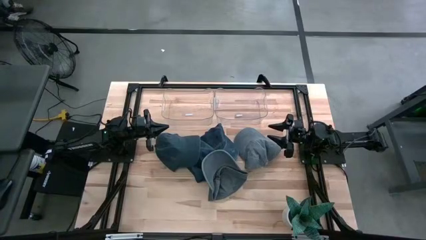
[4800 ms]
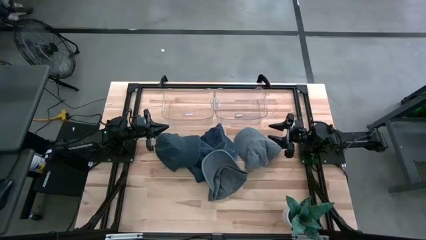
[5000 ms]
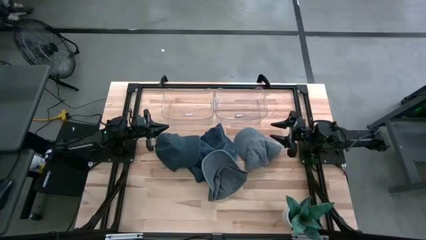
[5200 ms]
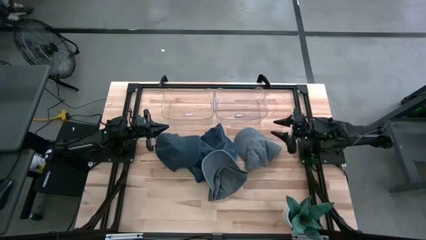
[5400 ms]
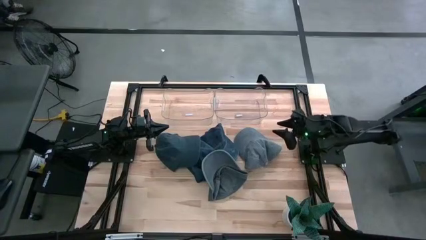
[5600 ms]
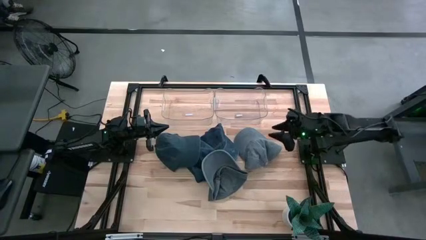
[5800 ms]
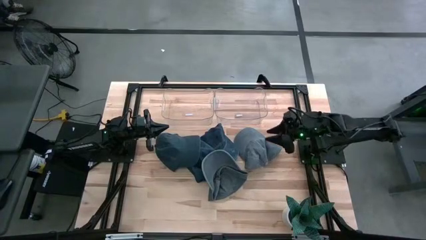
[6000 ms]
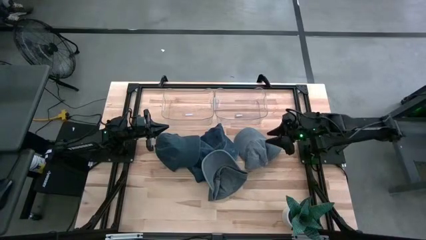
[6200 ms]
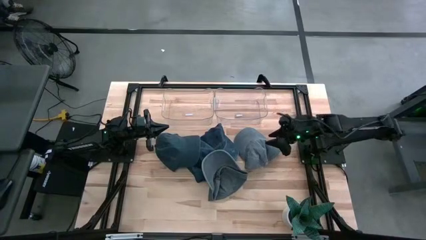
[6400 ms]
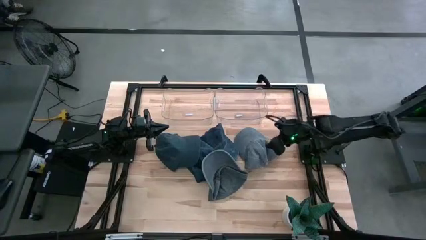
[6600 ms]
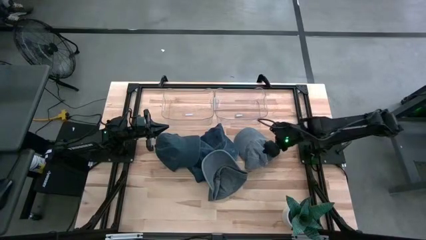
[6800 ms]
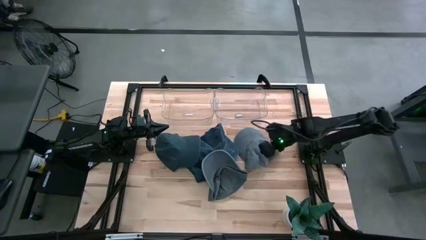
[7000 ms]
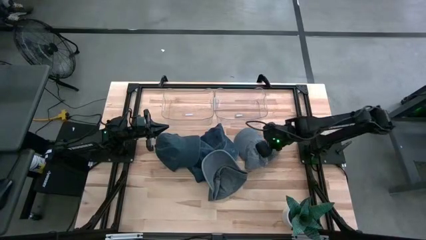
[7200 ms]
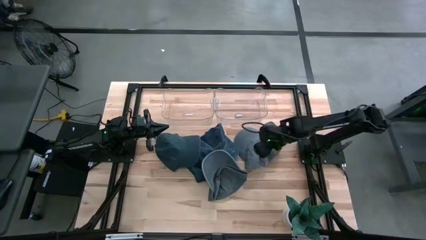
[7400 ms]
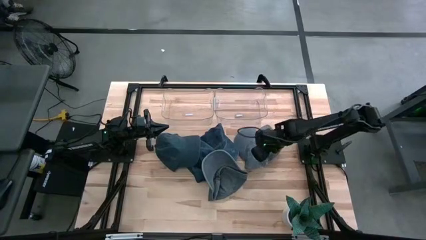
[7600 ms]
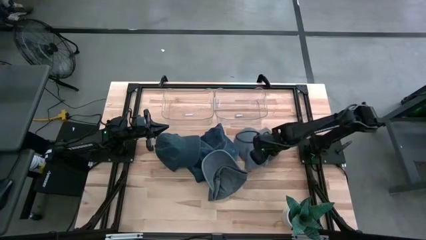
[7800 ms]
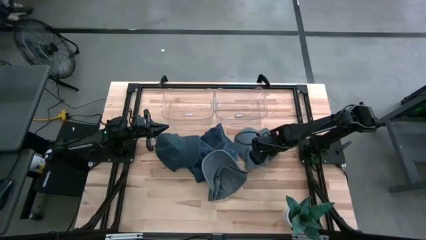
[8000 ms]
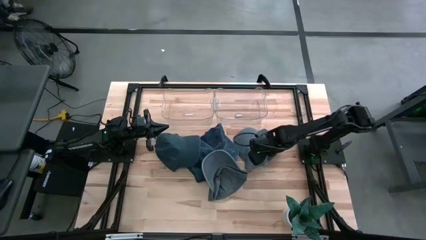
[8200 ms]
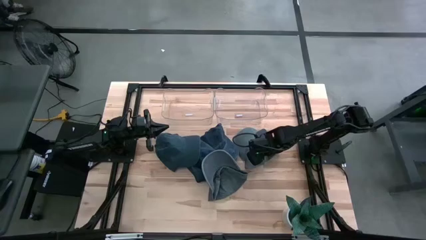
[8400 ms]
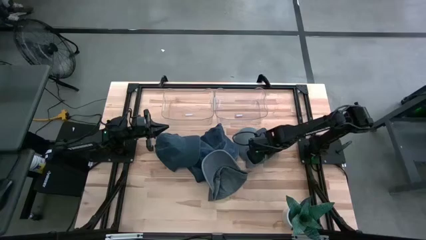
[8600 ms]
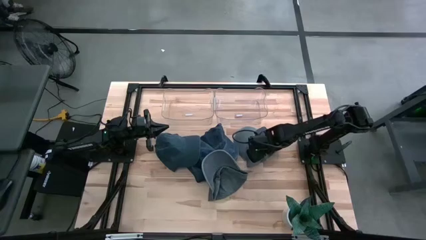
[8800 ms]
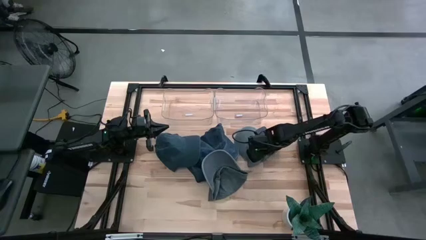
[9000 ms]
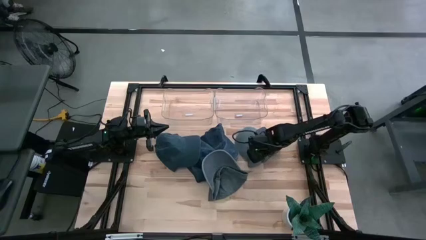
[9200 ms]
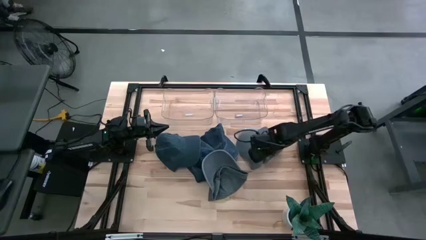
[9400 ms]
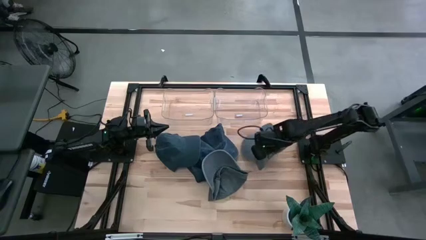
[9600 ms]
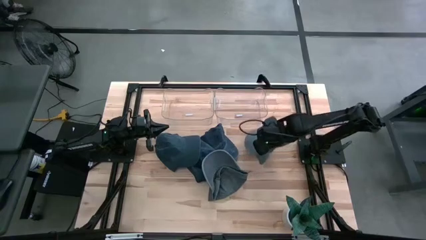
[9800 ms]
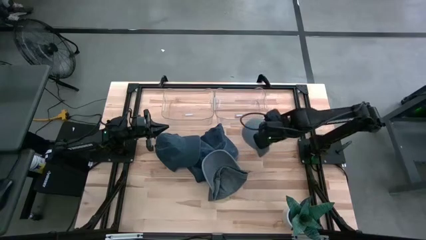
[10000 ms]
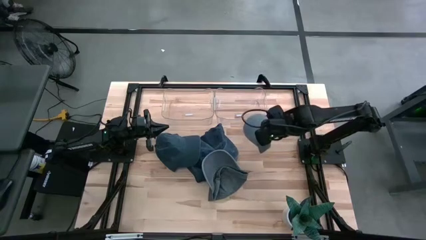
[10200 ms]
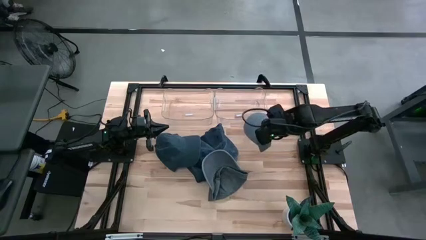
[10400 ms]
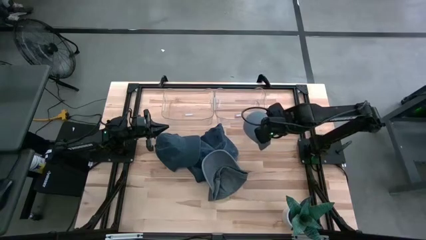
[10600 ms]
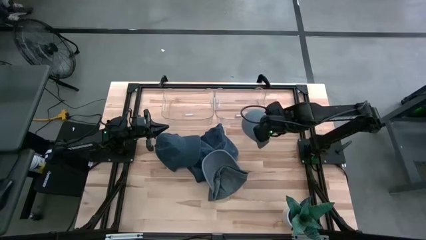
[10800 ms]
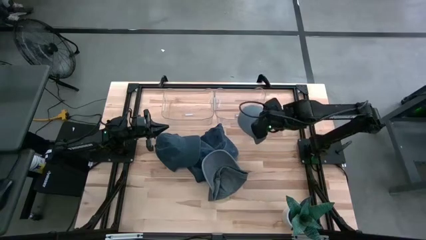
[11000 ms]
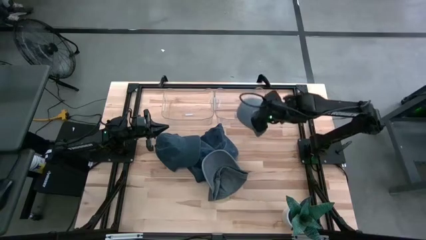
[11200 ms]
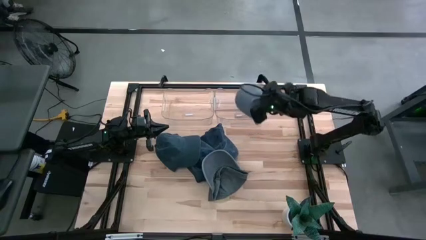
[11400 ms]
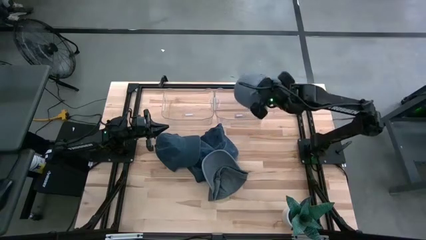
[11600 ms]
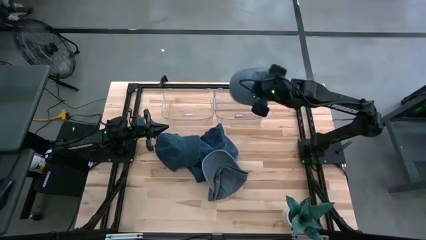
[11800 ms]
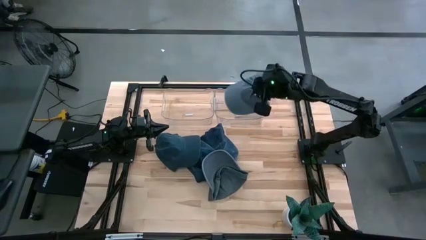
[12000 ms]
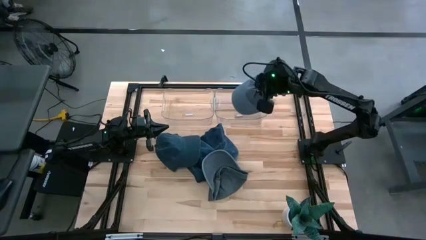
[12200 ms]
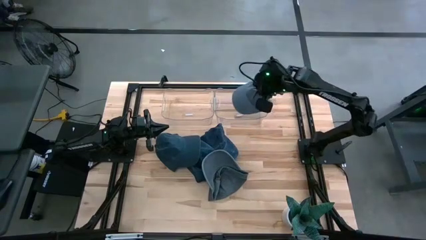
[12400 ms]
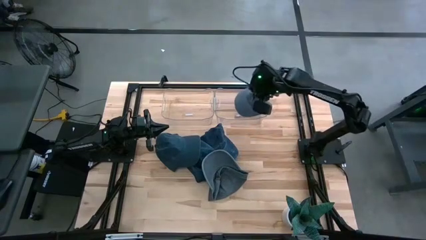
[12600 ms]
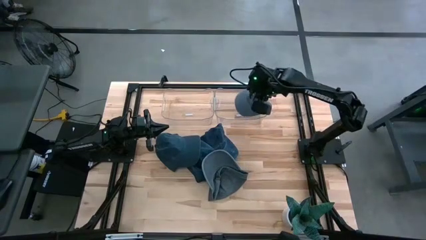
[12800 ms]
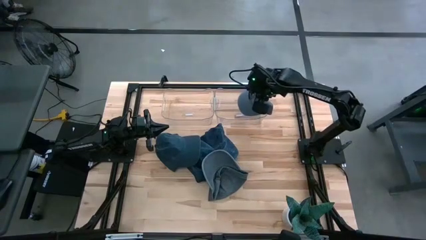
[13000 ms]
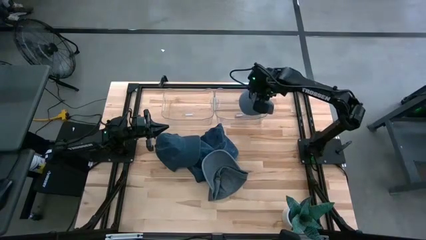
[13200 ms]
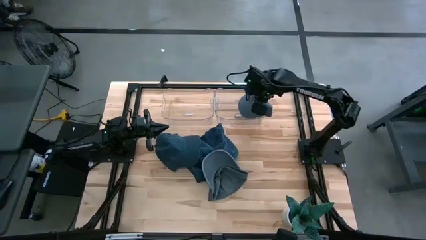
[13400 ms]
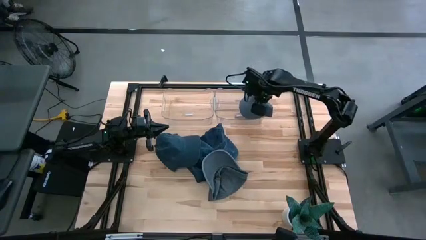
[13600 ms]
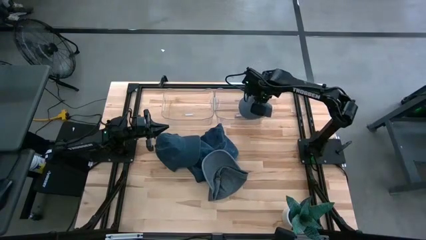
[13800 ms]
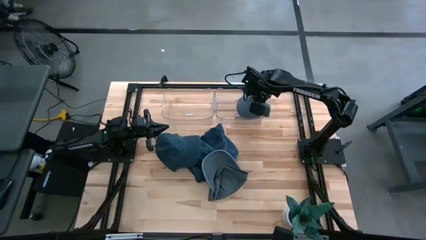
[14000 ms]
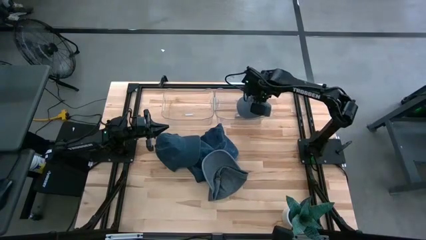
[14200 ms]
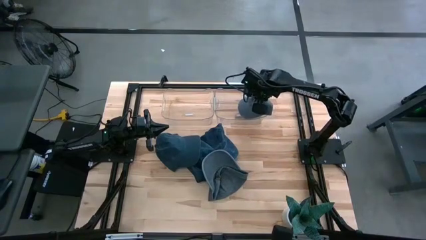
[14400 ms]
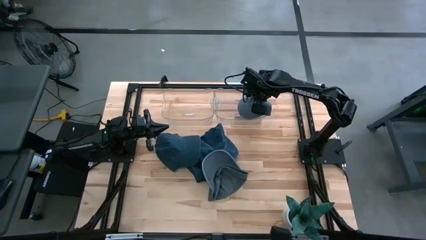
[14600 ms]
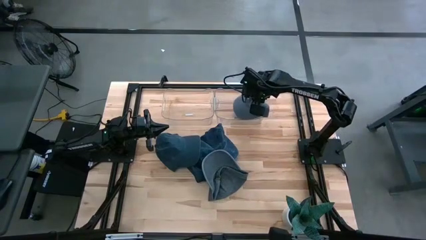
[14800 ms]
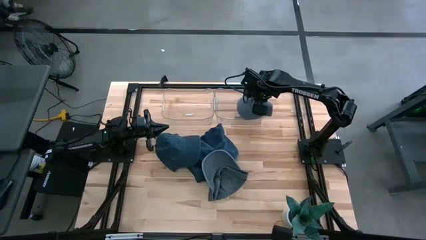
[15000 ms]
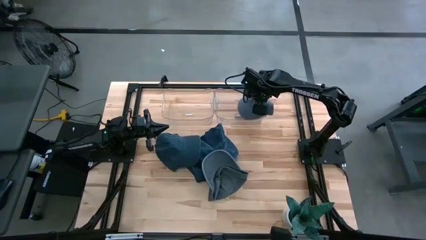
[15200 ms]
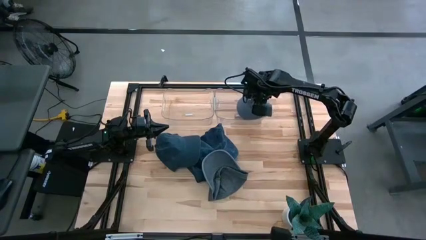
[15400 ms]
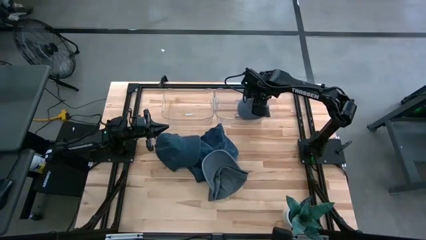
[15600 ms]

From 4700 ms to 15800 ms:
Task: Pick & Place hat
Put the right gray cap into the right transparent bin

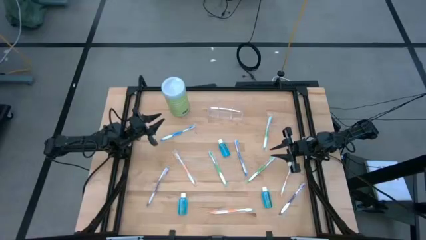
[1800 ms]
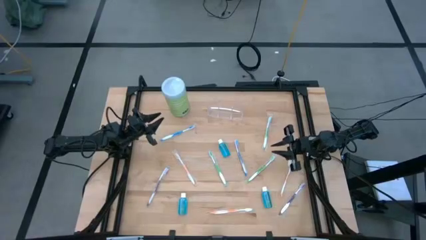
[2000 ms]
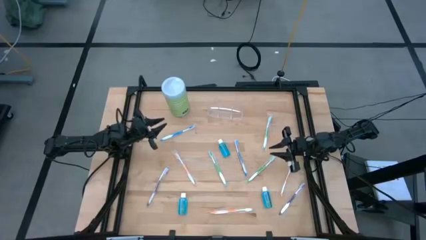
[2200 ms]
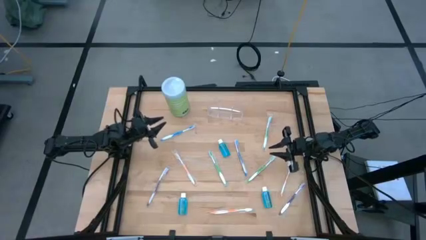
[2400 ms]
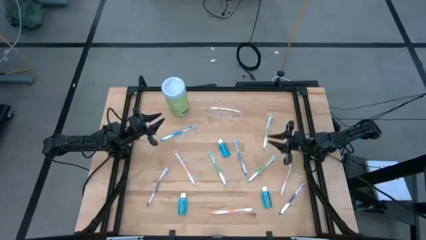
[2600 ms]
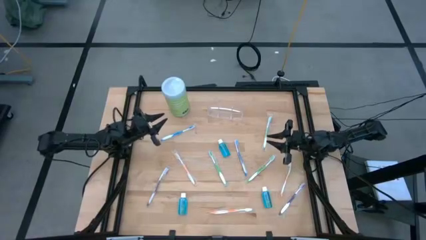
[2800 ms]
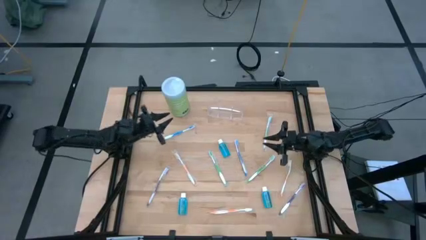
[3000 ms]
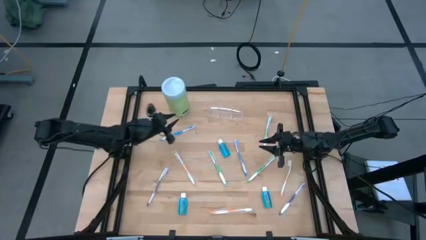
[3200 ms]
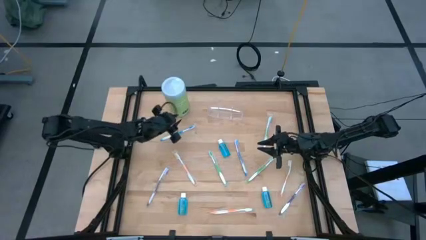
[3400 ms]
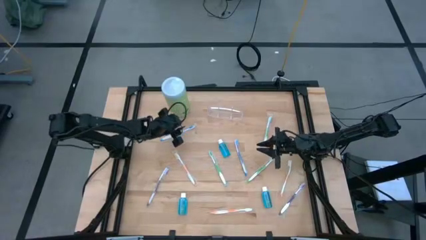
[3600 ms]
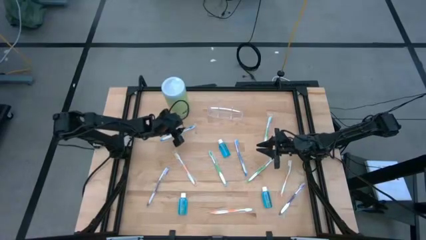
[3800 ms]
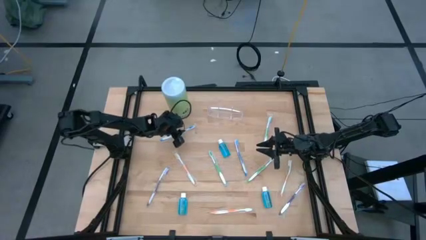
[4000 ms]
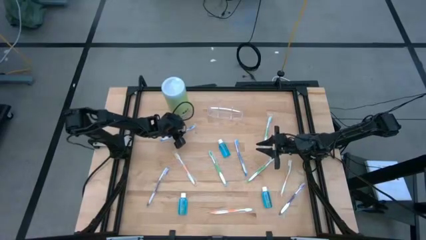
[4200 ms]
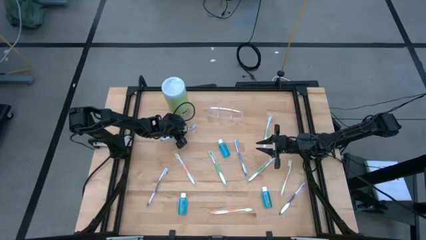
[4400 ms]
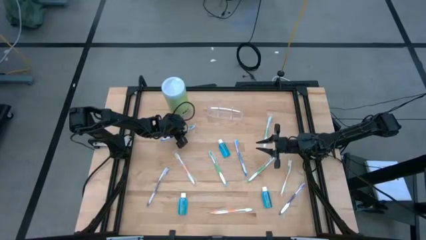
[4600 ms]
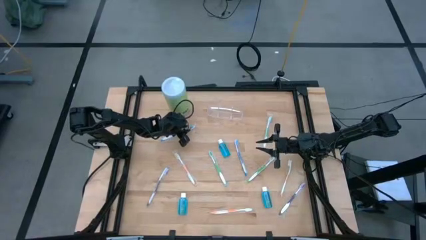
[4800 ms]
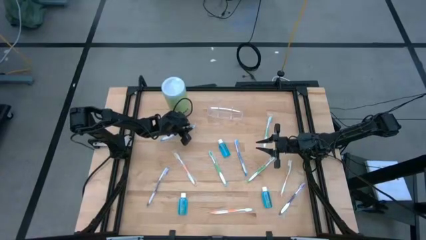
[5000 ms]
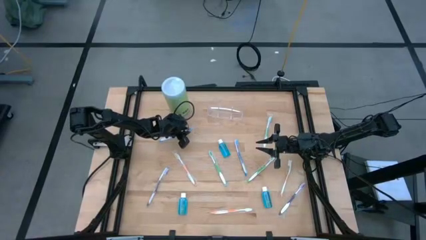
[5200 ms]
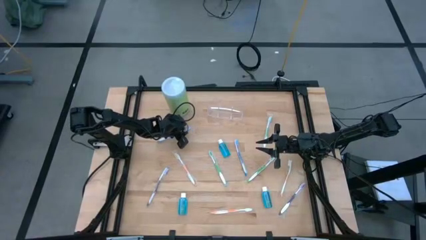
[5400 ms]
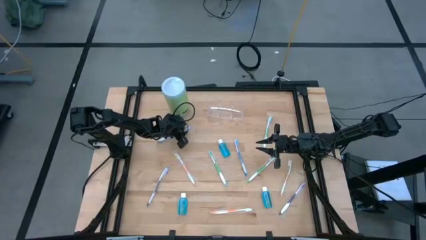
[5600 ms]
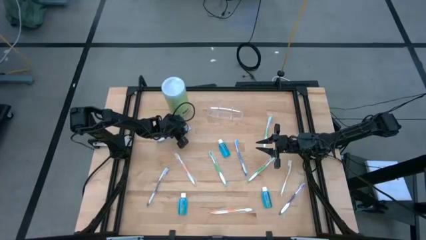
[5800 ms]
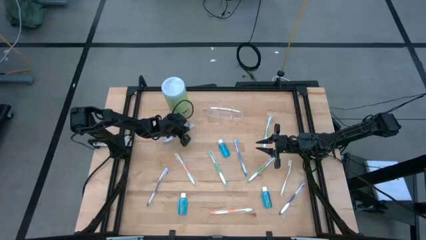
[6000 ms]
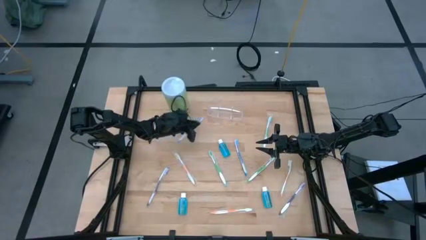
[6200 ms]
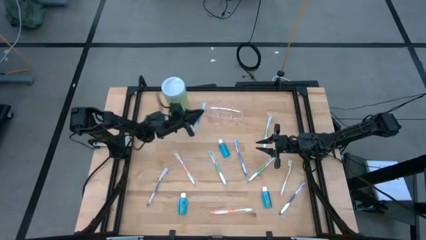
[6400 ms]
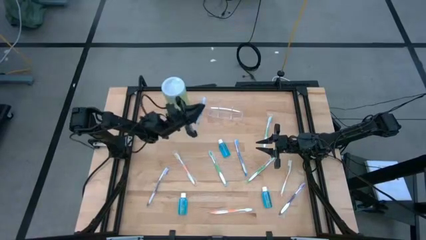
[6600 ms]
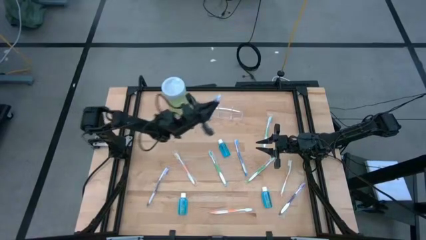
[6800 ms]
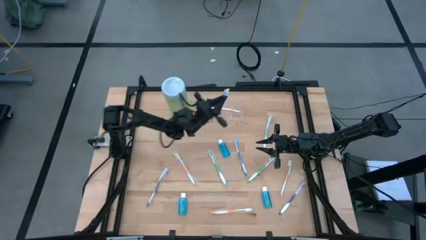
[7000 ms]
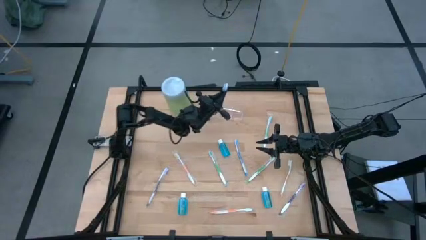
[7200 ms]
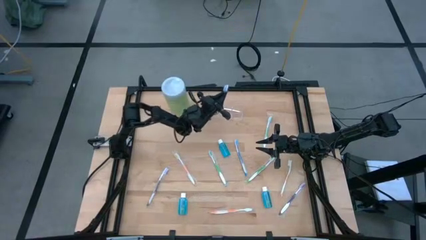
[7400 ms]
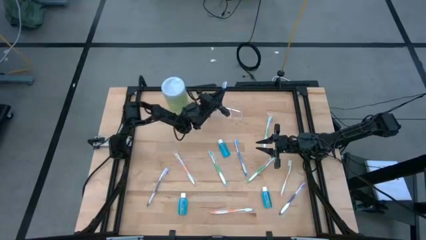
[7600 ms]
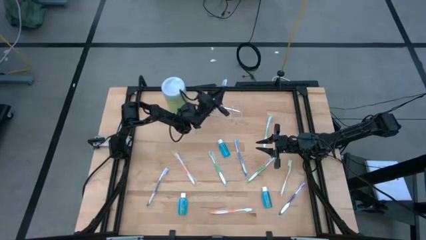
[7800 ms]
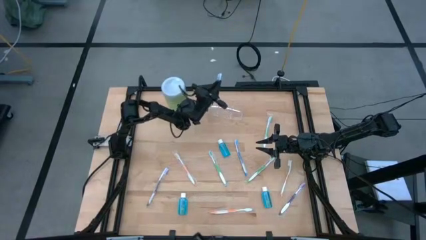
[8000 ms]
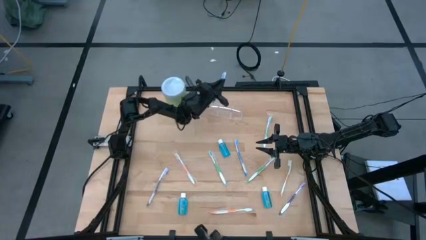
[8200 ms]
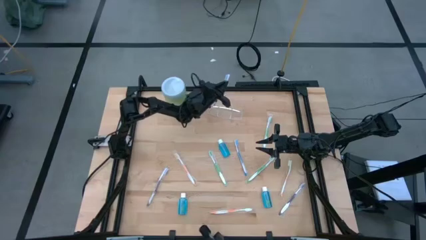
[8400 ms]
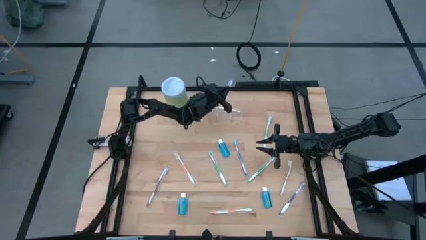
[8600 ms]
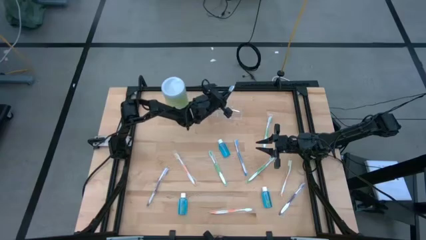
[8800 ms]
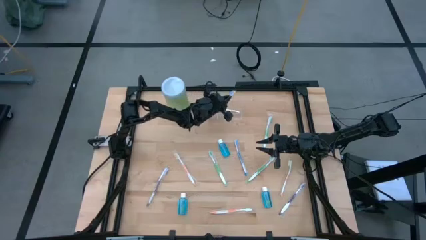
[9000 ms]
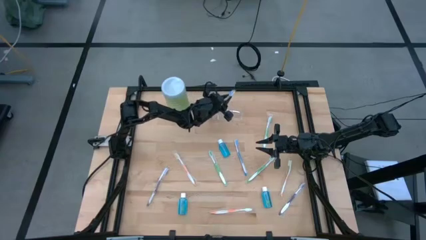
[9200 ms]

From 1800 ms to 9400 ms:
Task: Pick & Place toothbrushing station
Put the left blue toothbrush into the transparent organizer
